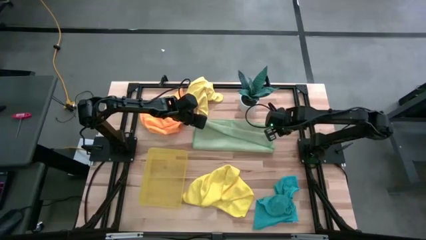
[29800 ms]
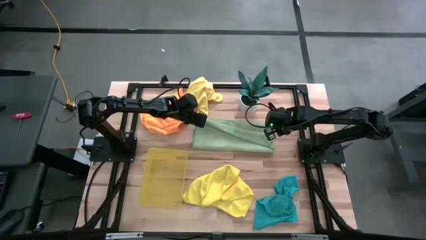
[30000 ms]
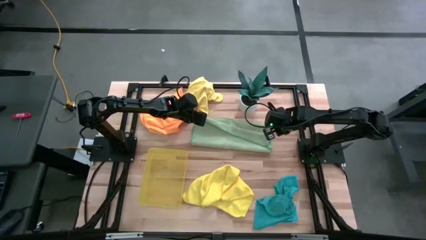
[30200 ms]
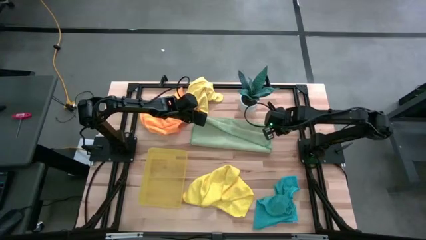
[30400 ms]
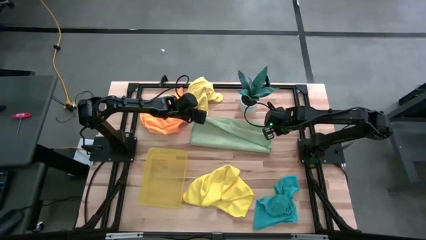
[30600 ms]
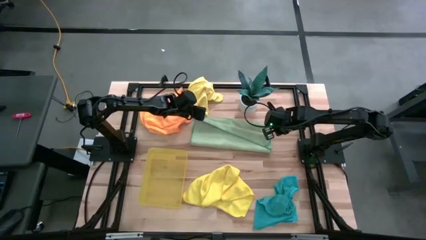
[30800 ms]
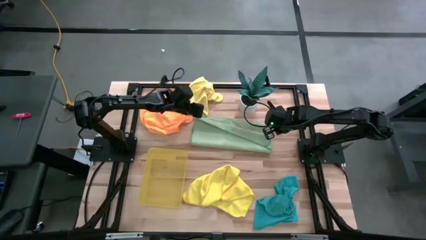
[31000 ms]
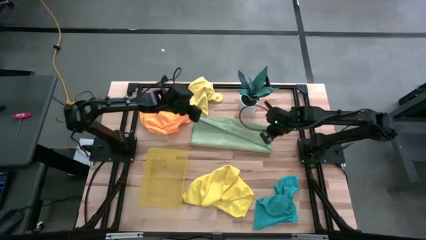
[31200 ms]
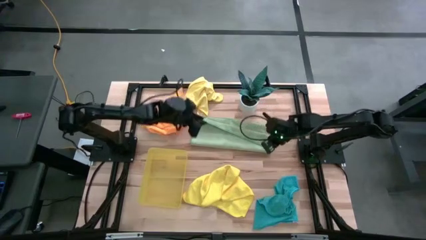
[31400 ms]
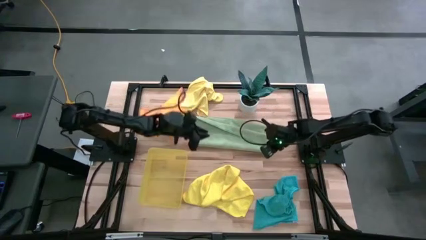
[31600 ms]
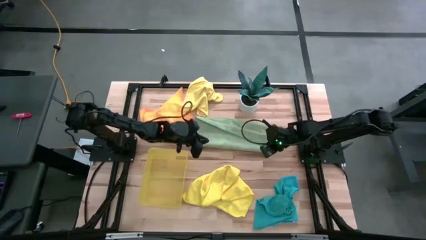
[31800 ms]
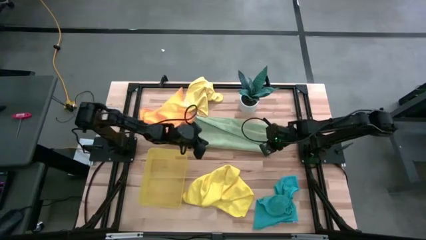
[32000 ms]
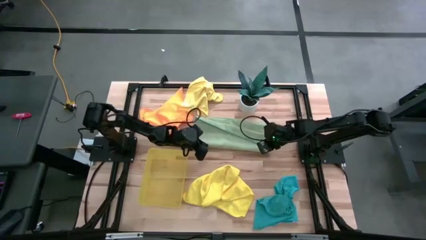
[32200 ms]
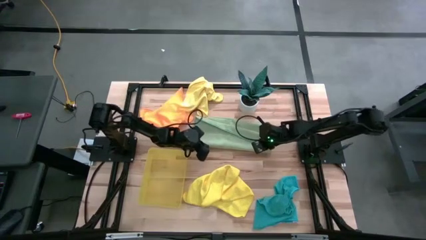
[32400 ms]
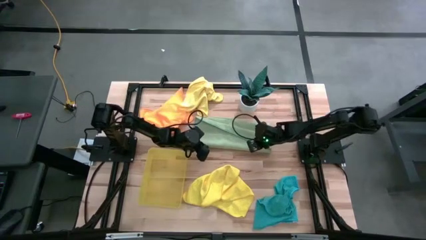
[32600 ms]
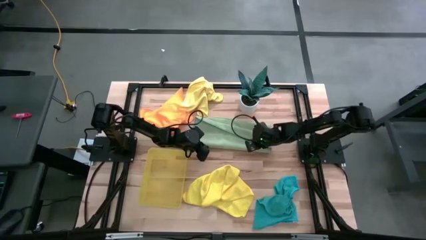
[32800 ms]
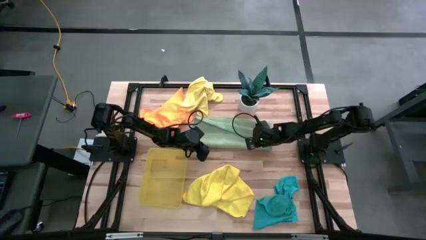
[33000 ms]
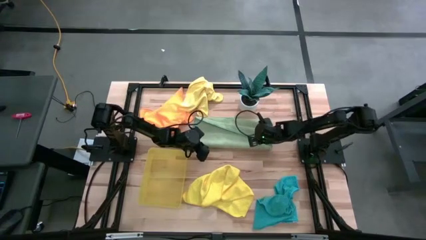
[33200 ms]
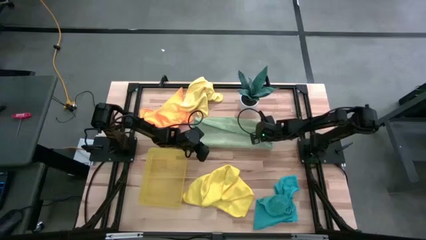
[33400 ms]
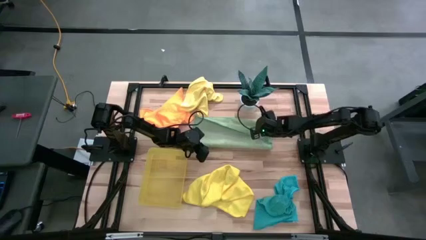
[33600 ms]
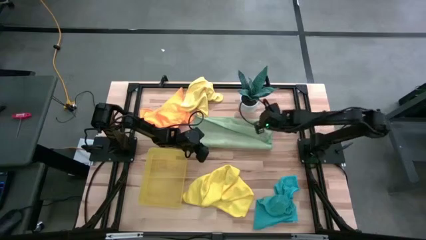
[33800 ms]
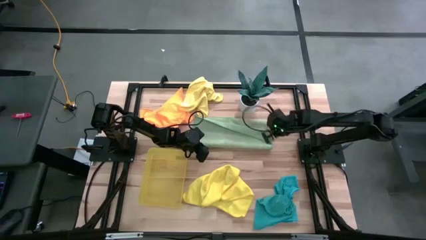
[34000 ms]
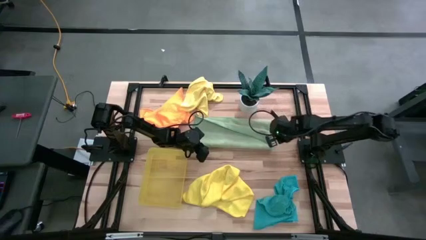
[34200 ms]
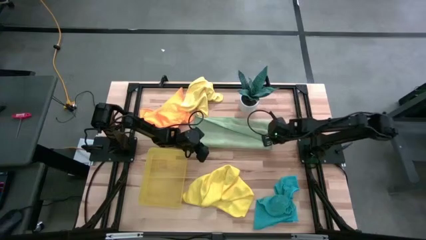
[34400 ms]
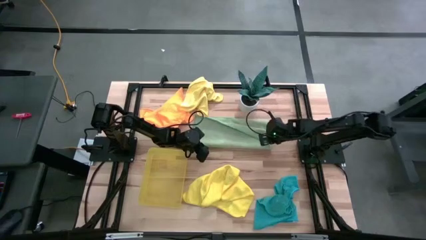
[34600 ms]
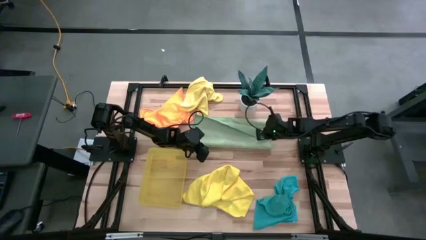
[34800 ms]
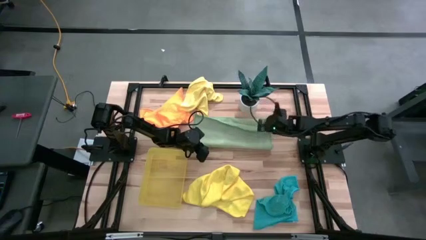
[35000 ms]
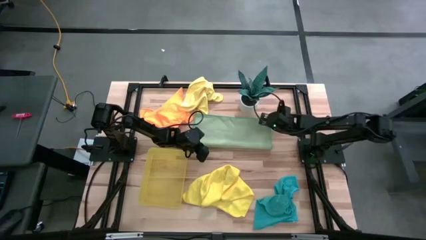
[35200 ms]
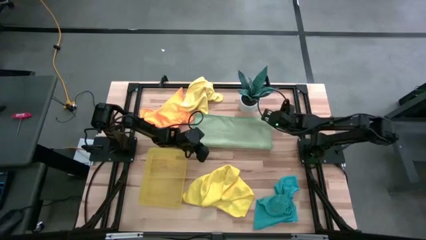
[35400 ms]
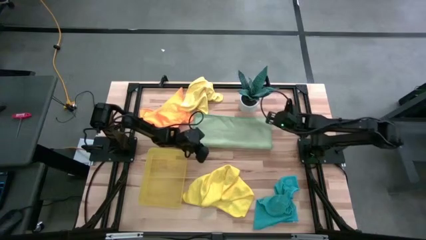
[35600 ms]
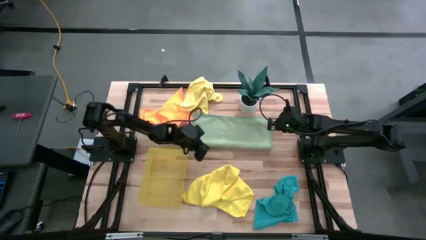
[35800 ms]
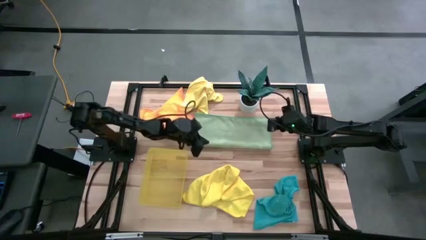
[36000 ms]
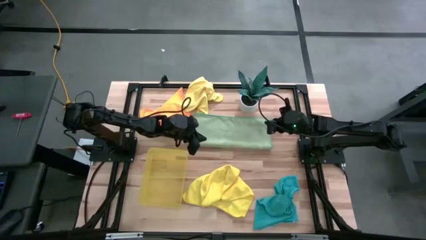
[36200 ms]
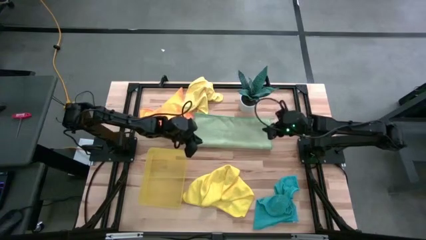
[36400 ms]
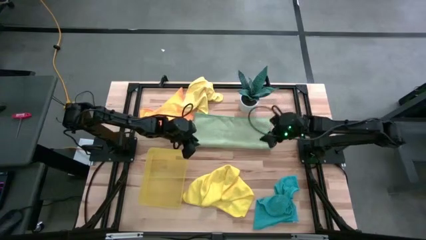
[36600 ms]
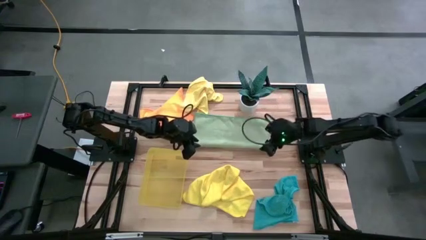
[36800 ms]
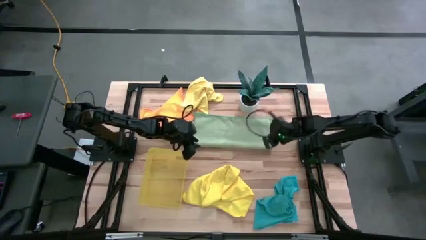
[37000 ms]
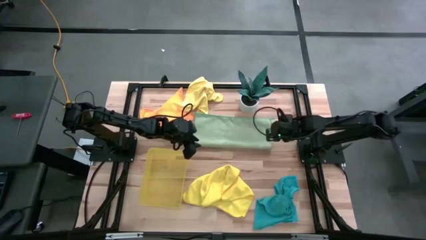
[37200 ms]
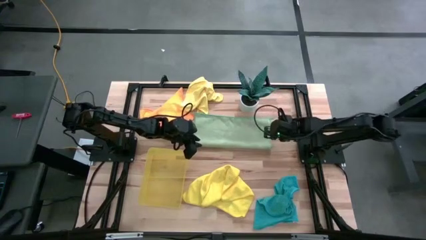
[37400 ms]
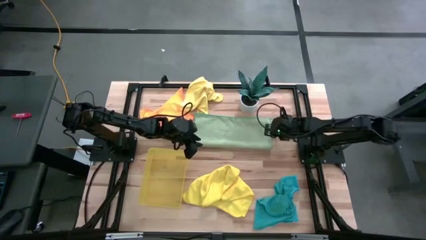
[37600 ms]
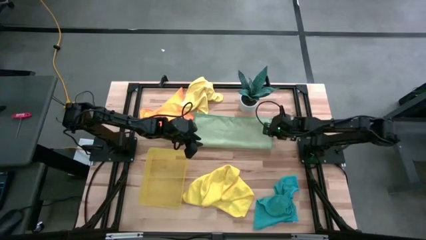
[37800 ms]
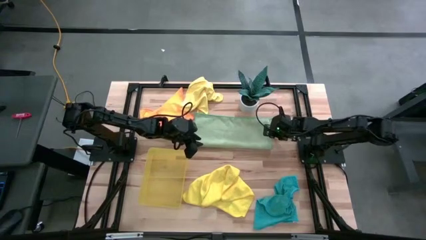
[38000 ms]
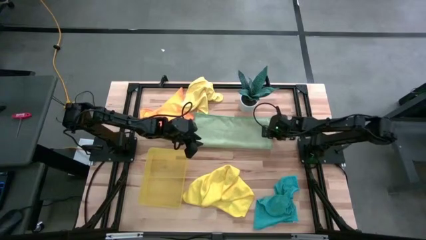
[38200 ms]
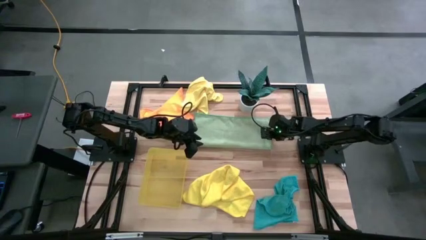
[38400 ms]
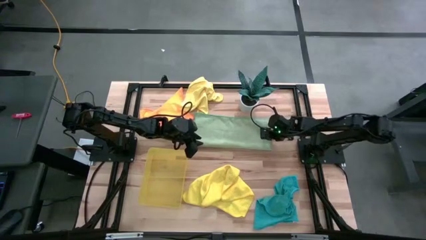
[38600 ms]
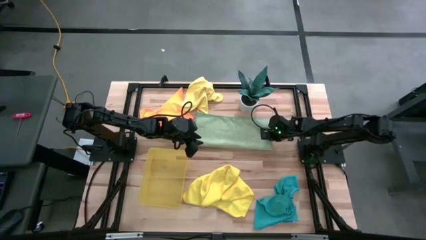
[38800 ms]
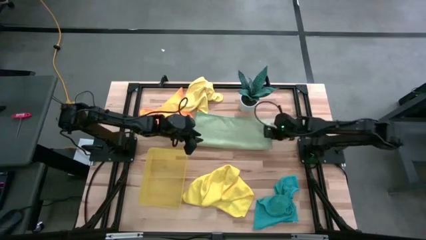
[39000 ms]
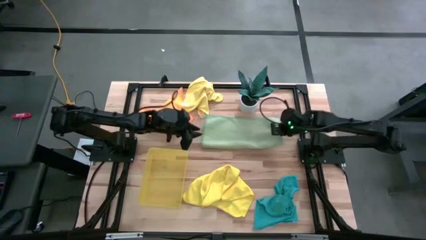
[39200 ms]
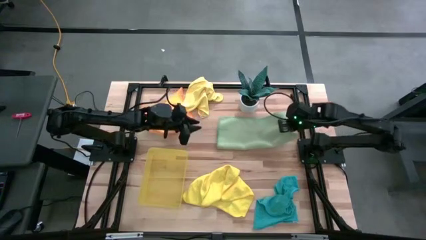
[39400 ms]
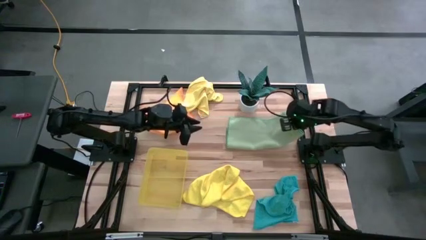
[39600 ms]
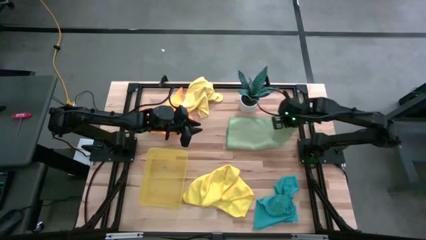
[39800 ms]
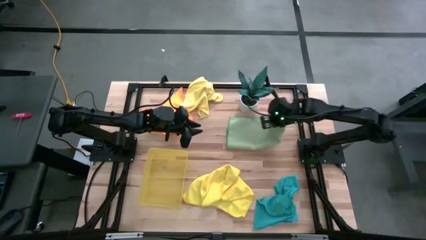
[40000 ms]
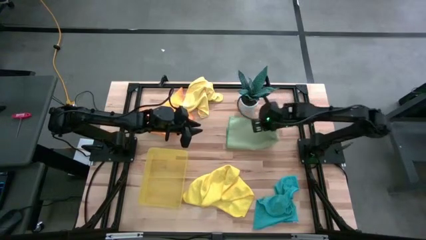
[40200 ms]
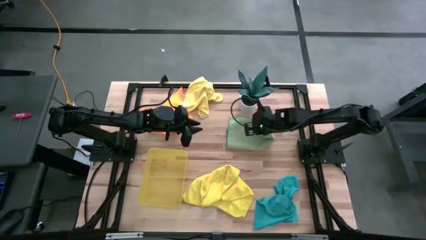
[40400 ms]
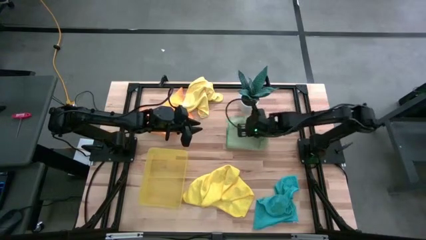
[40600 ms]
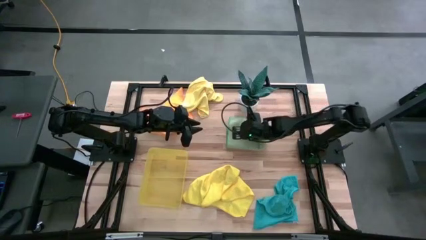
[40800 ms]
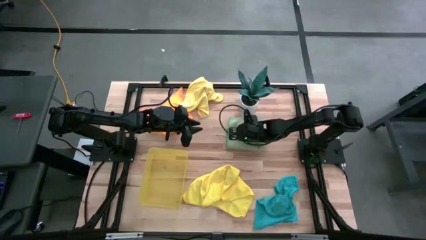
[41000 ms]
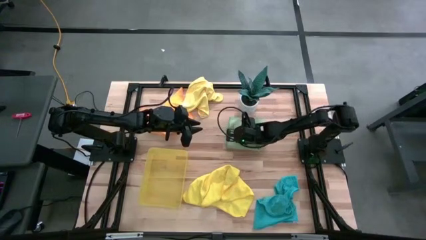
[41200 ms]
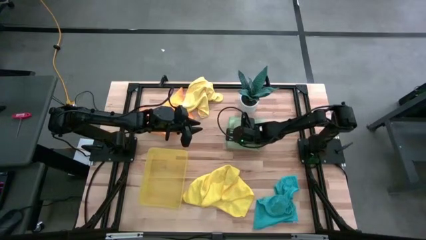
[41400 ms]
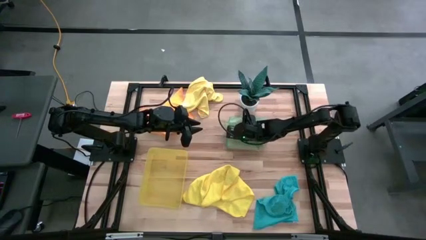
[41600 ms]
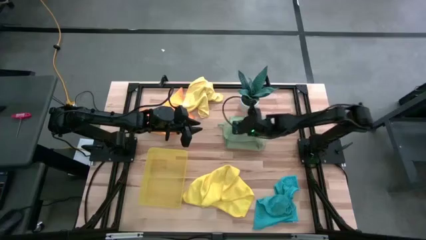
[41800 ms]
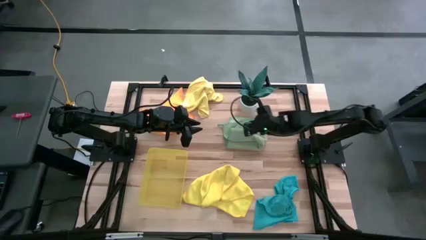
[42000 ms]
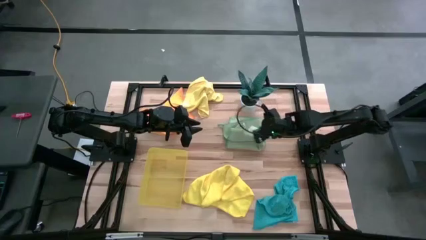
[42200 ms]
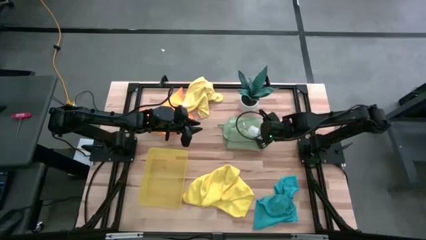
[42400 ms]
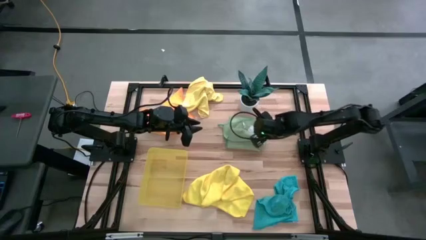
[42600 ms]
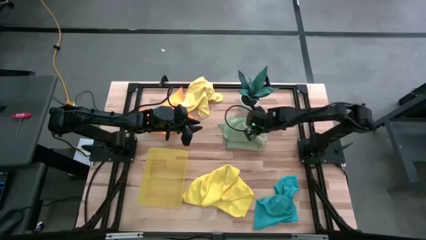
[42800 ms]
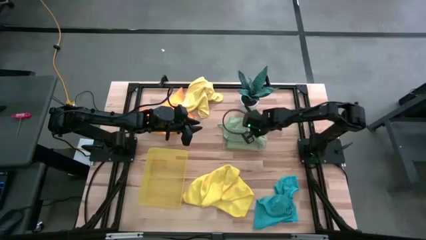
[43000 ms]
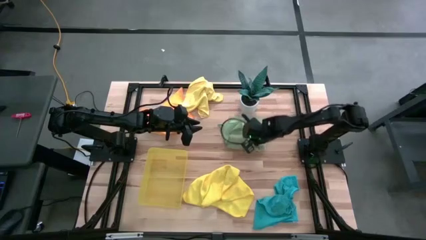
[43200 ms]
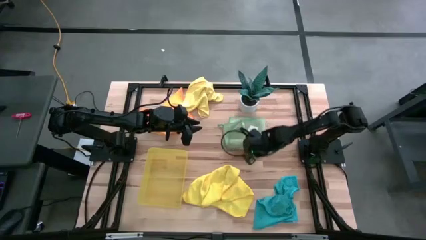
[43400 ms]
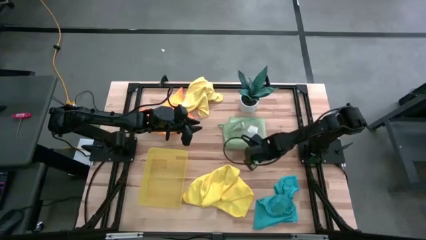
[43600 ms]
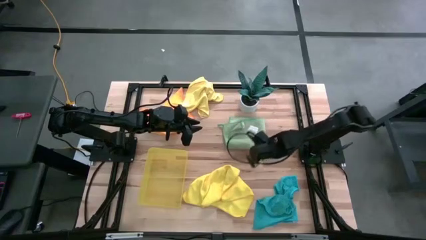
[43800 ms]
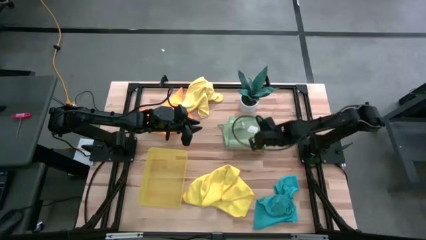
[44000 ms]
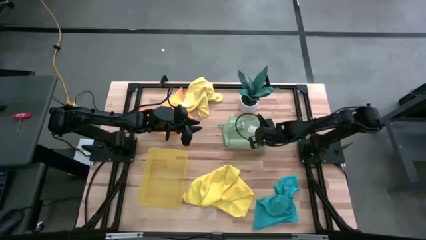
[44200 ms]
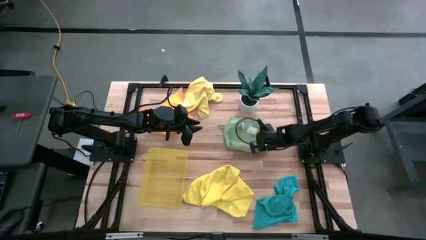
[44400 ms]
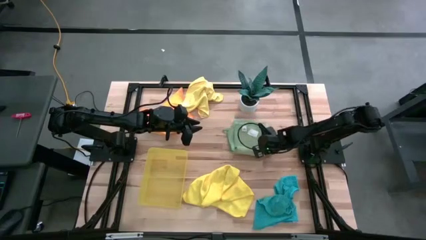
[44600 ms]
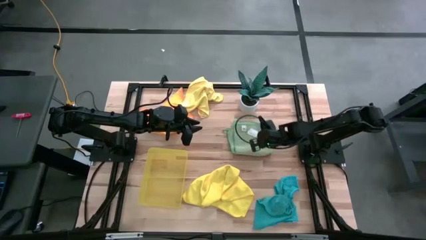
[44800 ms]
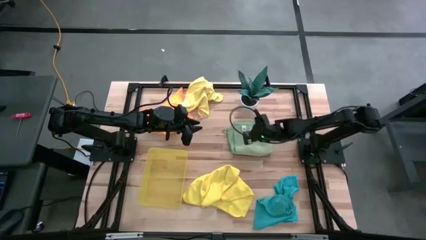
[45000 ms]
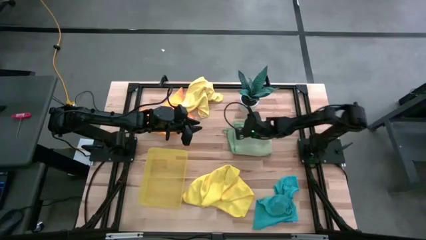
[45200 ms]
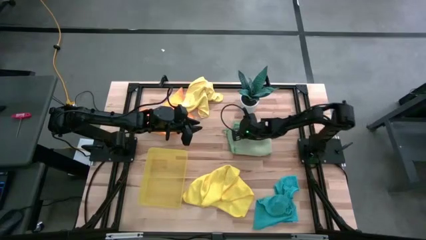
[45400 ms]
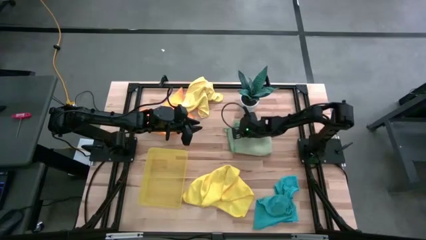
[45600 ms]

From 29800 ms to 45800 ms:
Task: Fold microfiber towels
Fold the green microfiber cloth
